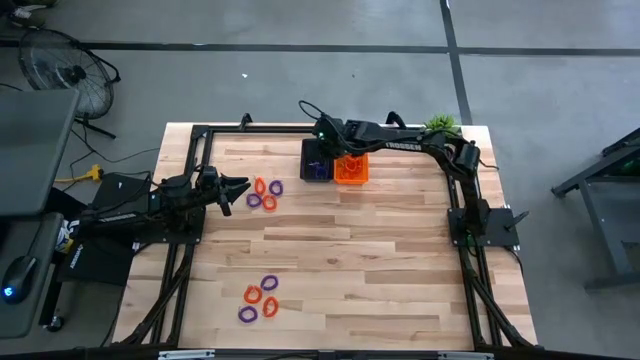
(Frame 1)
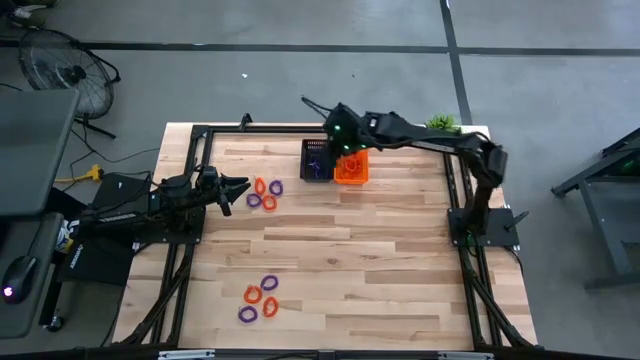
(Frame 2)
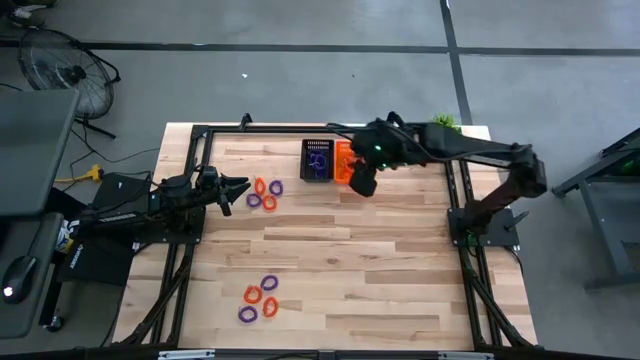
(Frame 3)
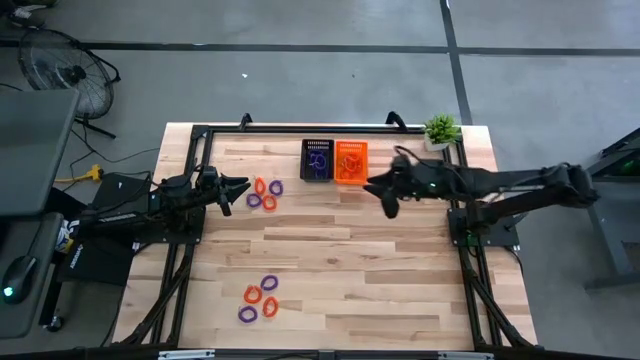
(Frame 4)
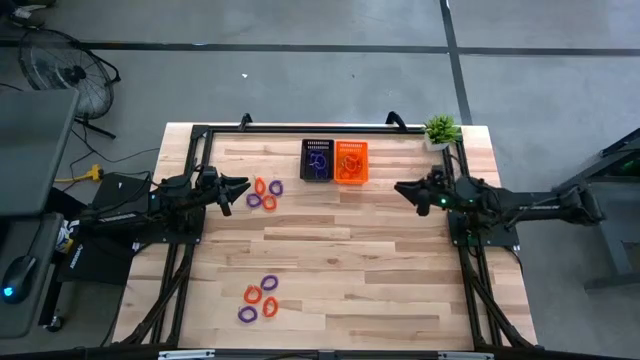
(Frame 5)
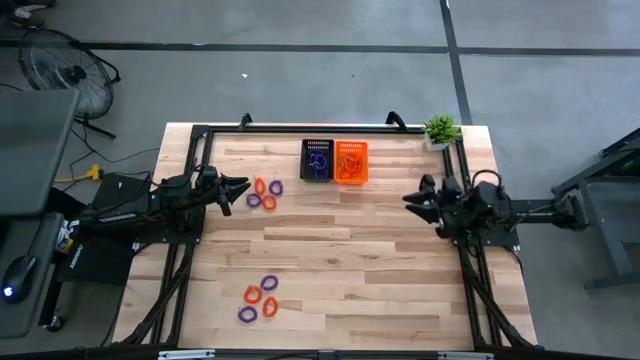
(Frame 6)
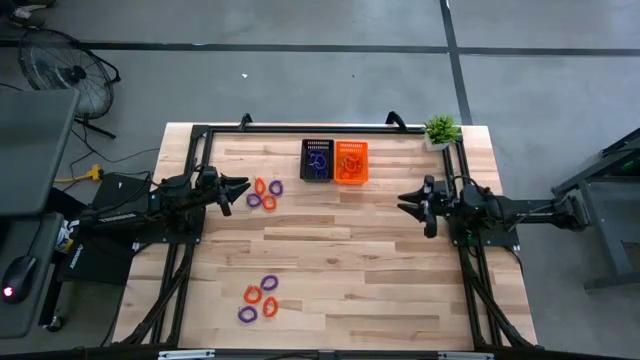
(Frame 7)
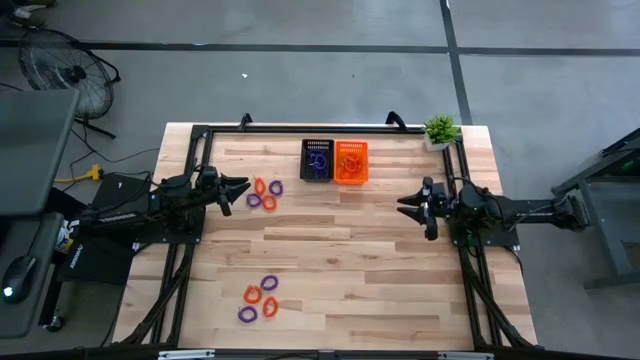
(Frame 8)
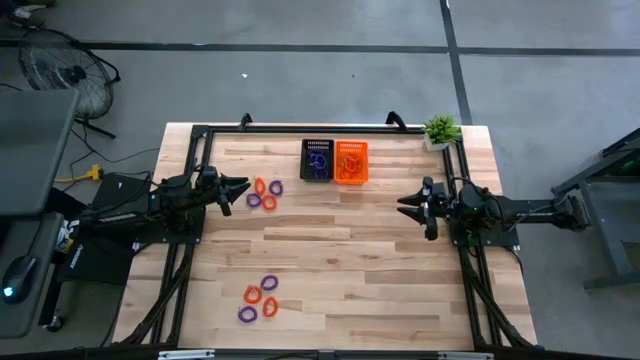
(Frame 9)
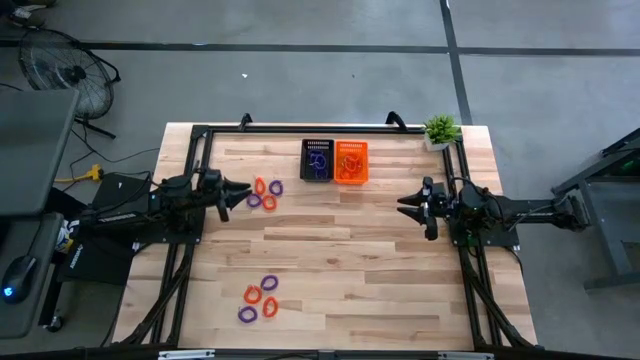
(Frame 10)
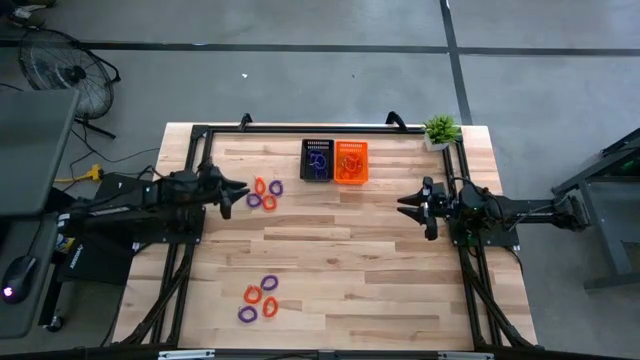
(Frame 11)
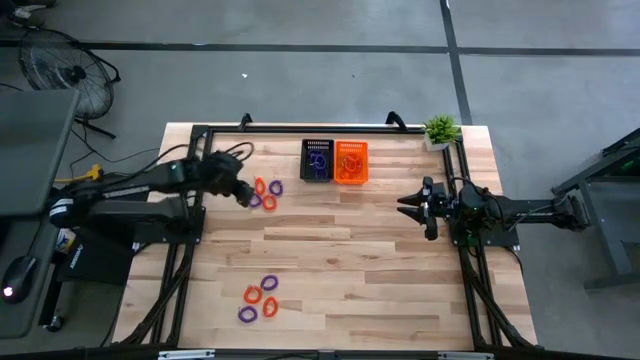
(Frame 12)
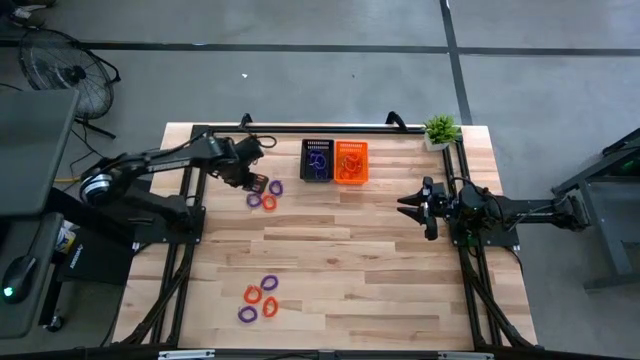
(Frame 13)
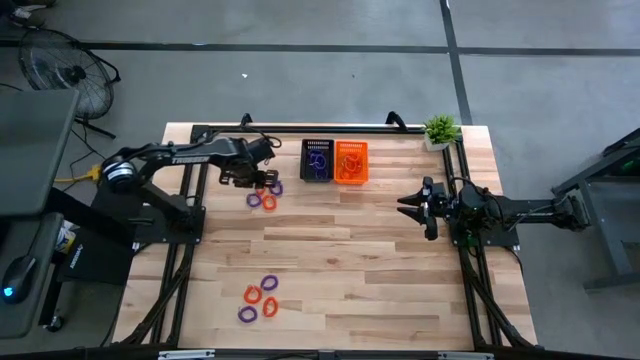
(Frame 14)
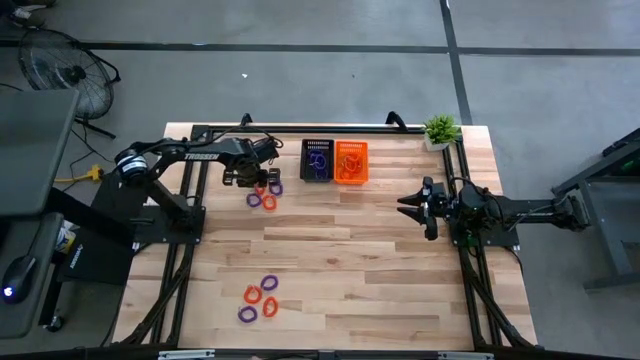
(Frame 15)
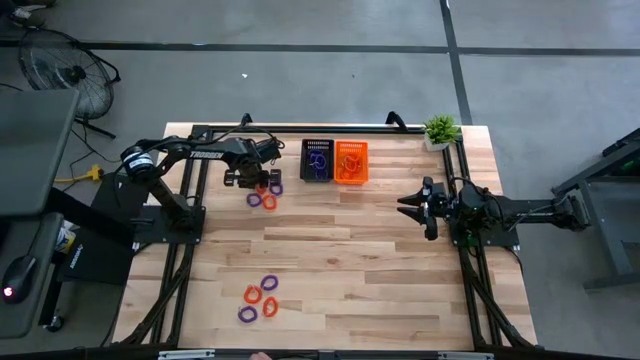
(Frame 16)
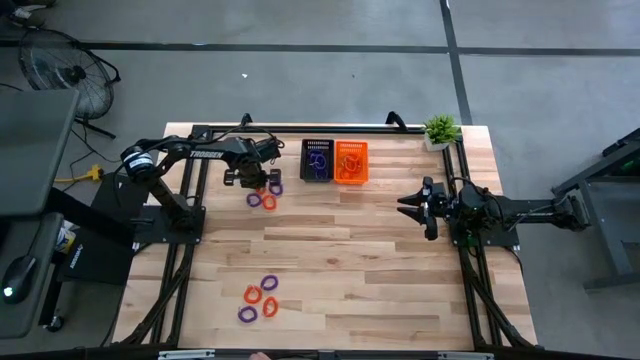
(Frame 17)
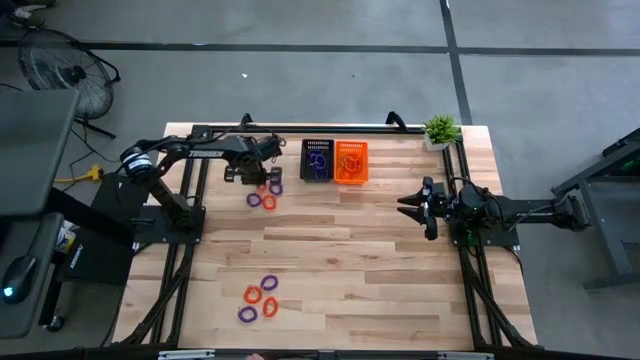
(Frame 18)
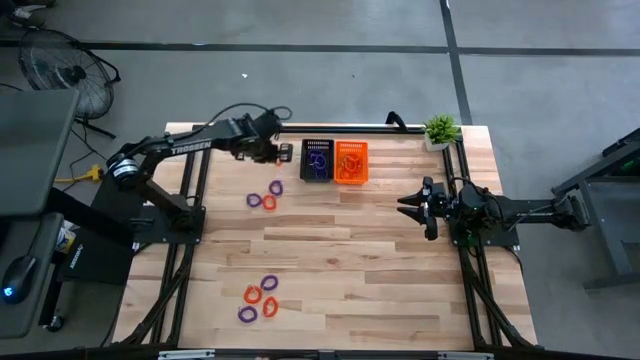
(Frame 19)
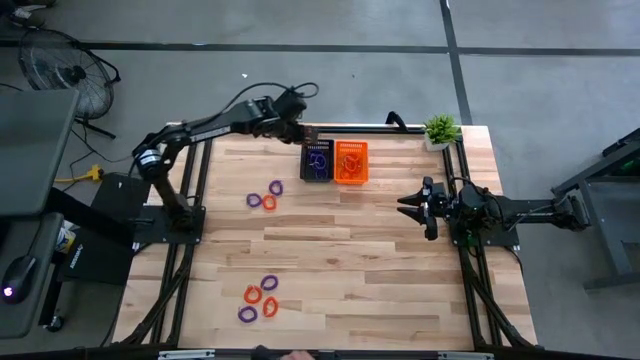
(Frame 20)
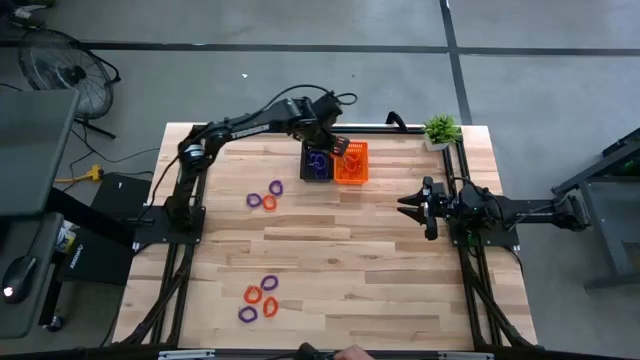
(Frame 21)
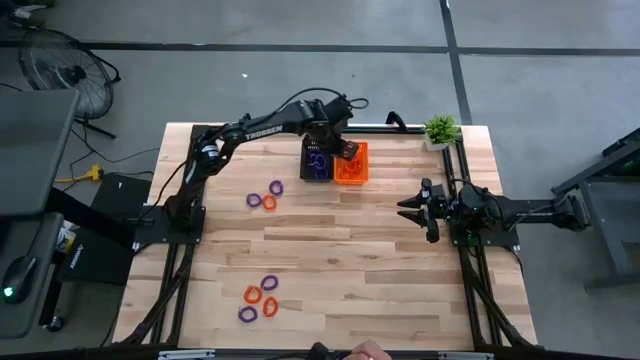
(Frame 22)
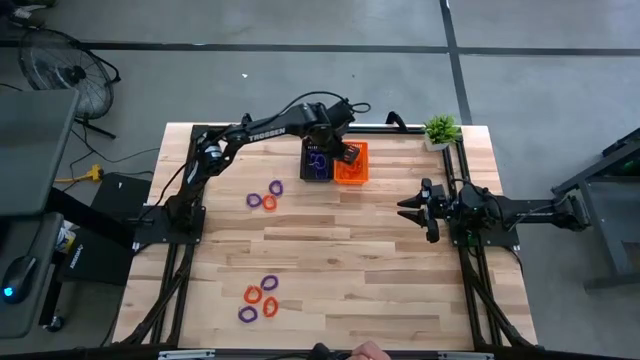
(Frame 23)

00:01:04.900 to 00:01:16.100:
Task: Sort spring keychains
Put the orange spring keychain in the orange bin

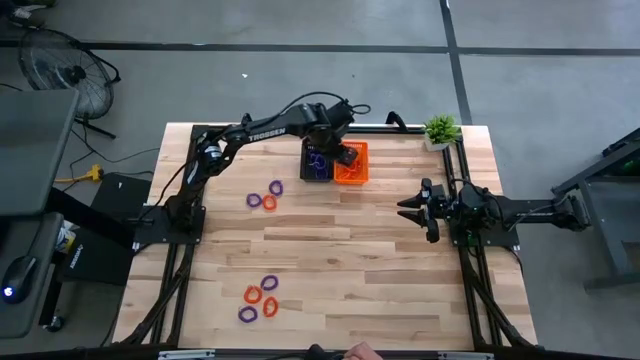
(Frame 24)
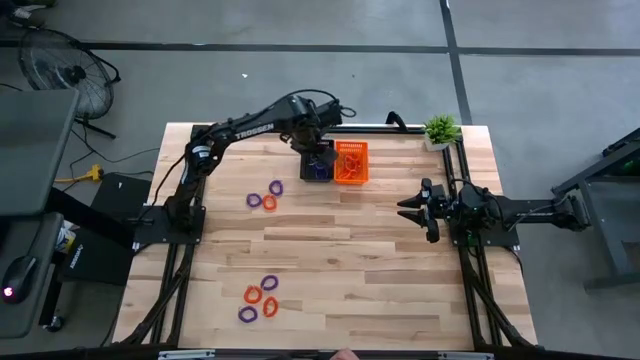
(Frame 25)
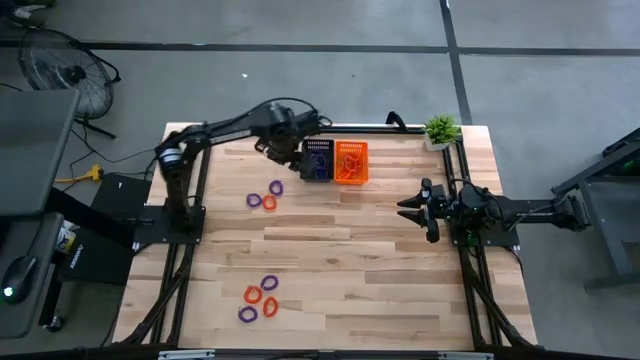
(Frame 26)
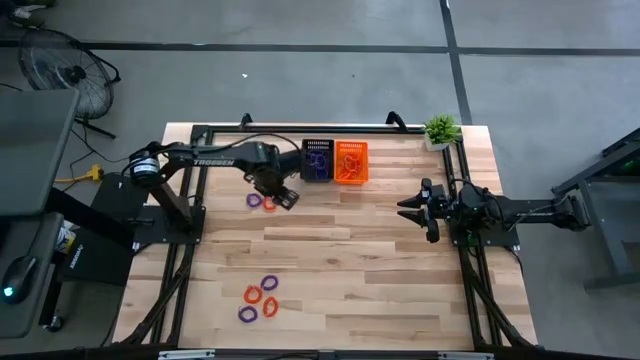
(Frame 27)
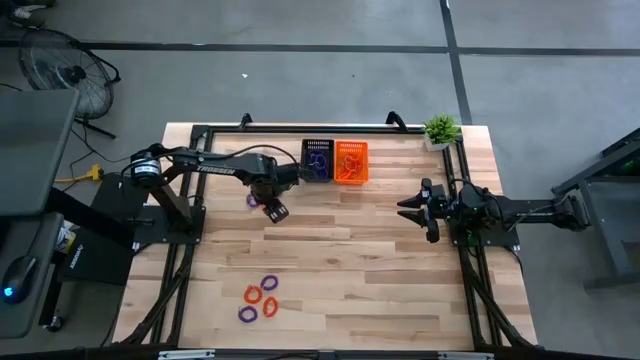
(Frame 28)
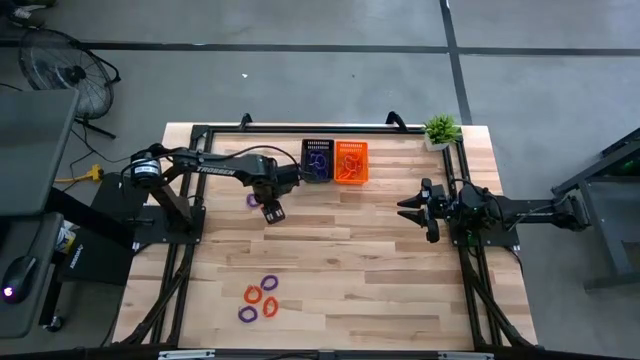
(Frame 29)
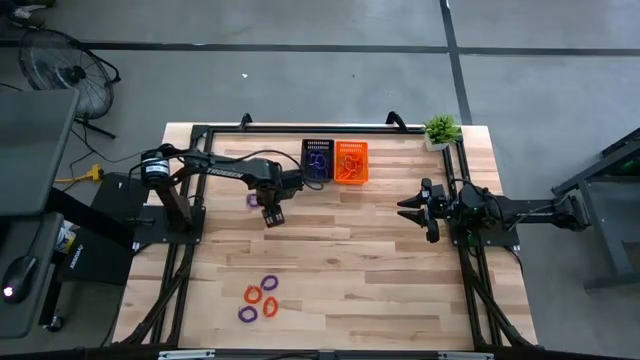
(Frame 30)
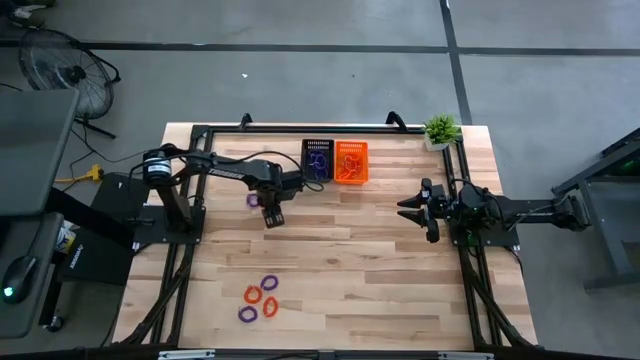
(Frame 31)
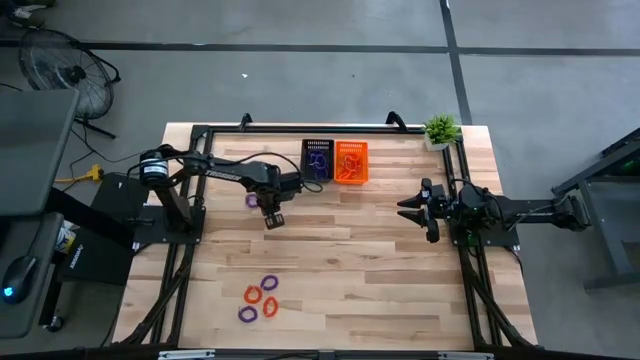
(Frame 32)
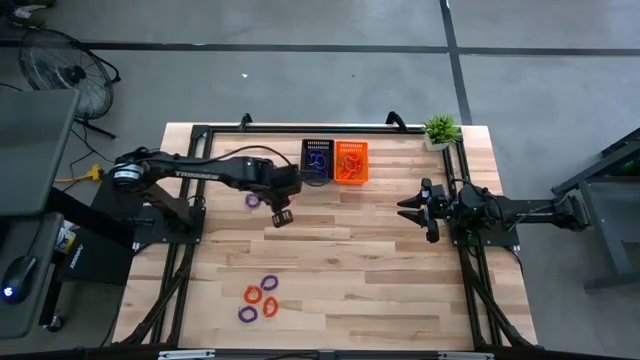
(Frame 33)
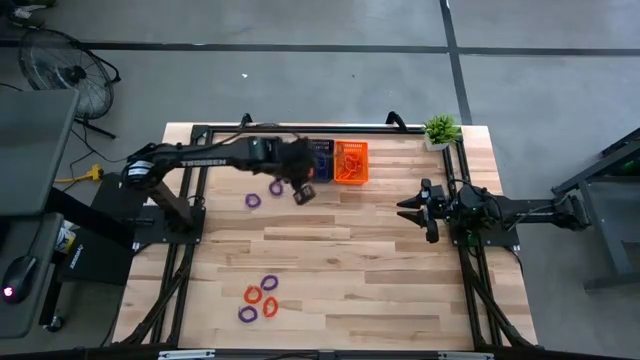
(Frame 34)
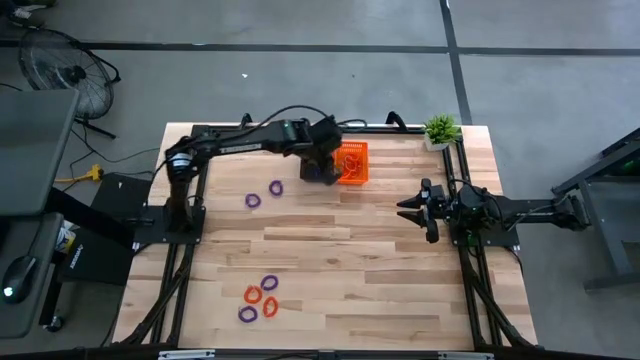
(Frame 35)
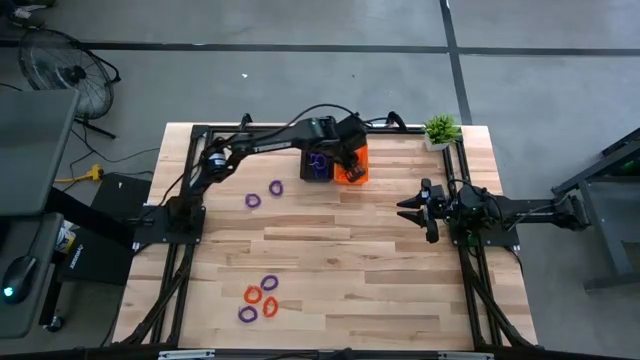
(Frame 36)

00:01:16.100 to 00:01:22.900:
Put the top orange spring keychain in the orange bin

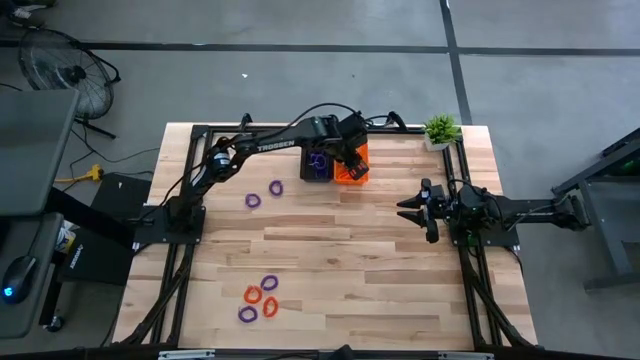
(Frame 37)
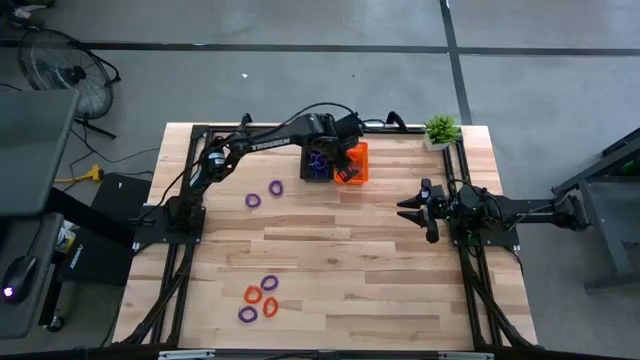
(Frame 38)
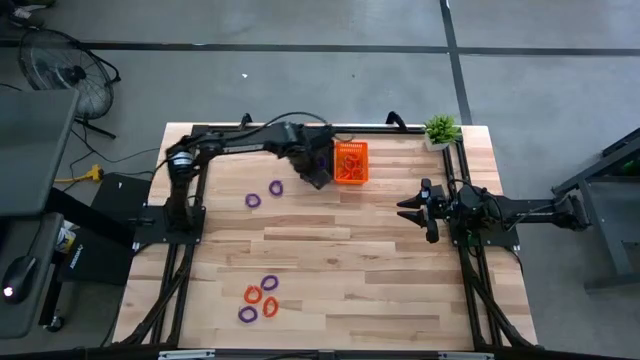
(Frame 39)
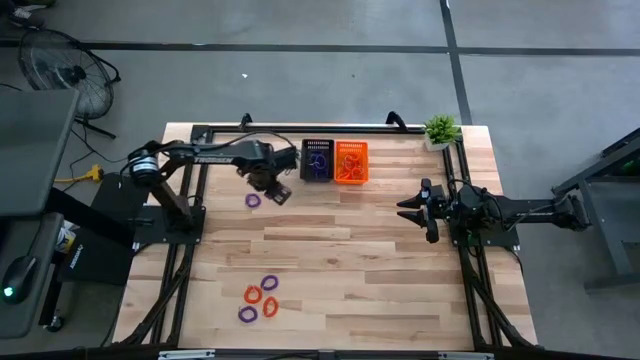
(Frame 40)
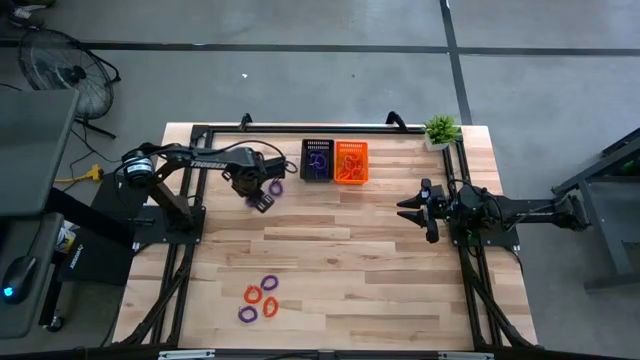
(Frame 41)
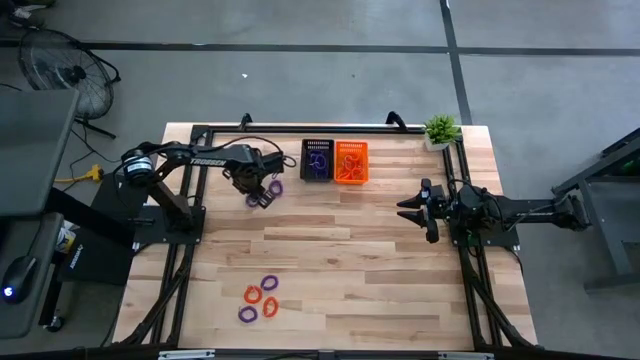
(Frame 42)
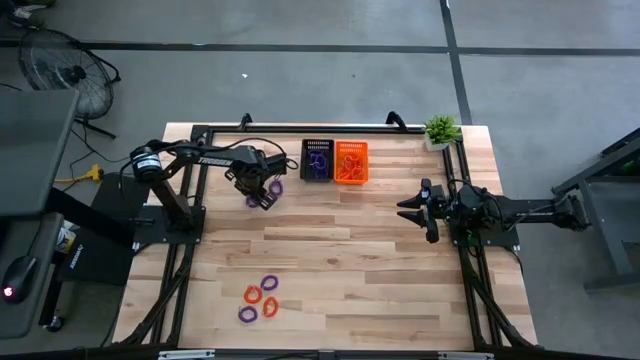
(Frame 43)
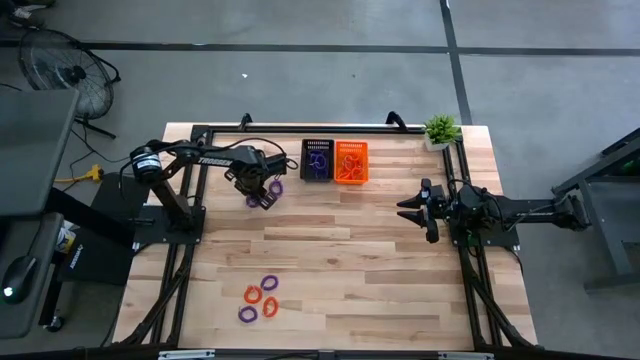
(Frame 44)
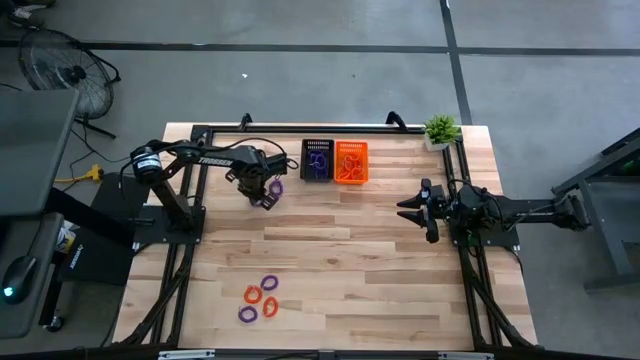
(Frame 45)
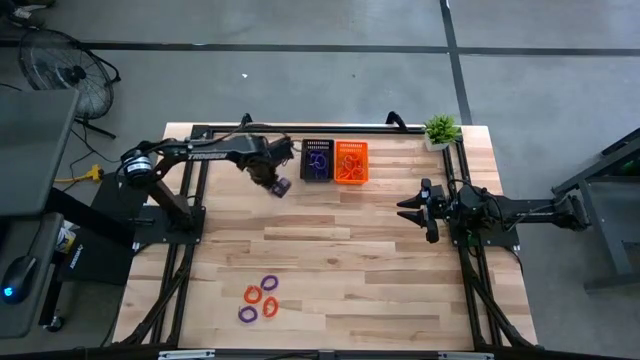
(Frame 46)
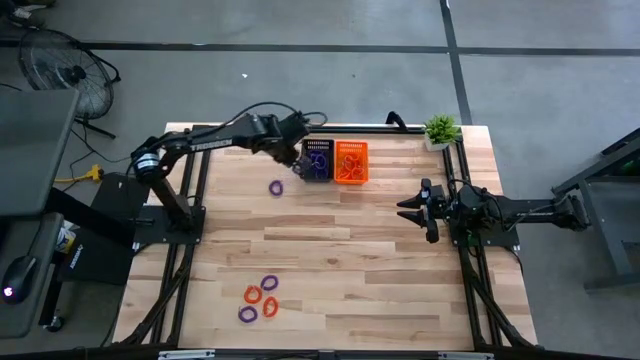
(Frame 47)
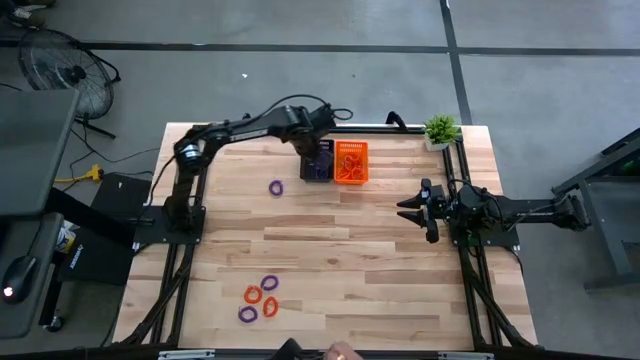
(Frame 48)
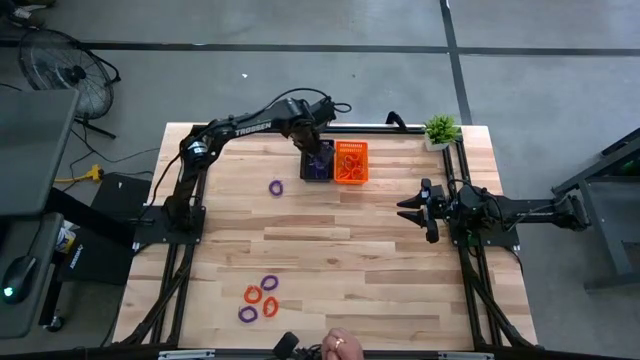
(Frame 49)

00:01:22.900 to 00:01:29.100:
Put the purple spring keychain in the black bin
